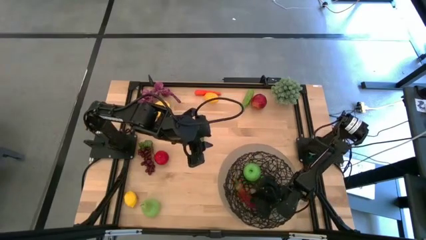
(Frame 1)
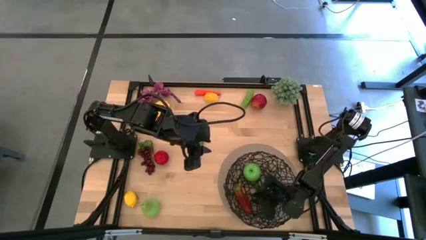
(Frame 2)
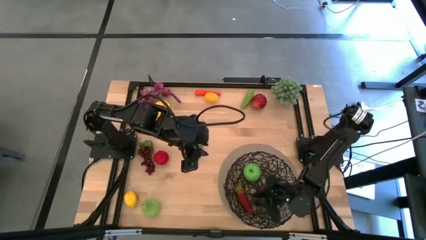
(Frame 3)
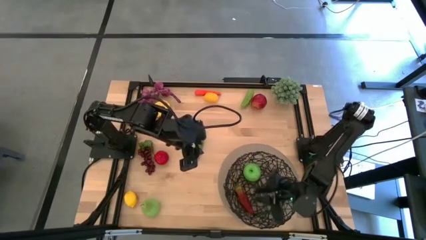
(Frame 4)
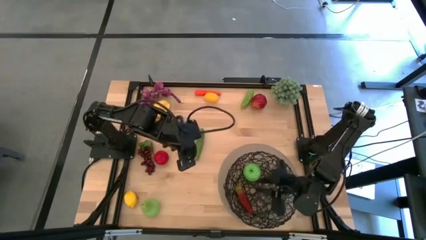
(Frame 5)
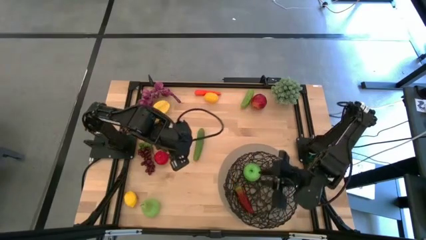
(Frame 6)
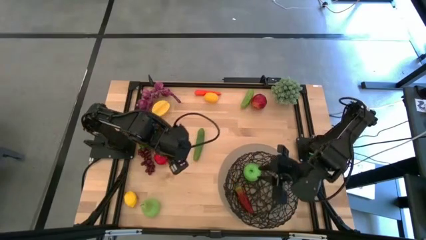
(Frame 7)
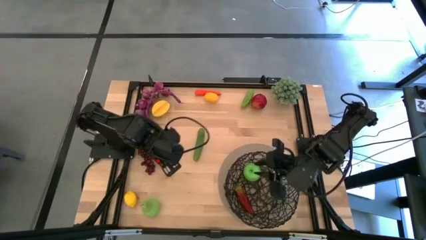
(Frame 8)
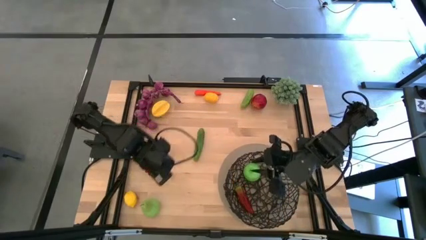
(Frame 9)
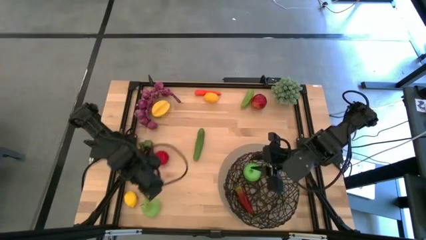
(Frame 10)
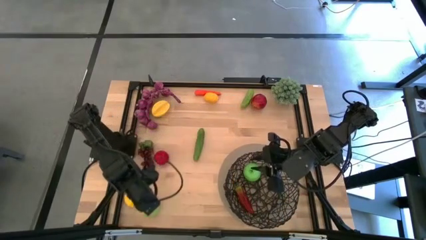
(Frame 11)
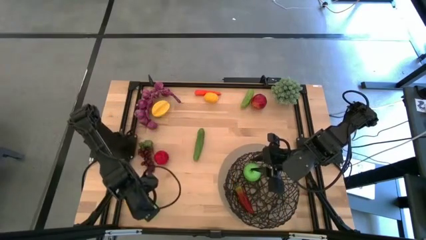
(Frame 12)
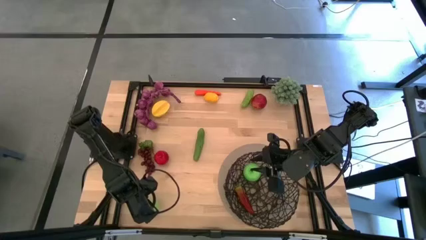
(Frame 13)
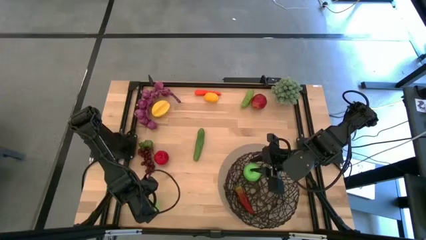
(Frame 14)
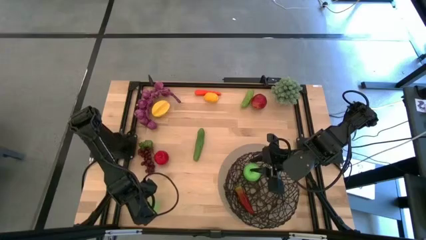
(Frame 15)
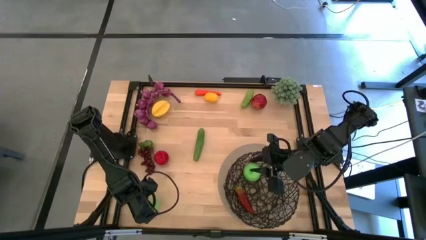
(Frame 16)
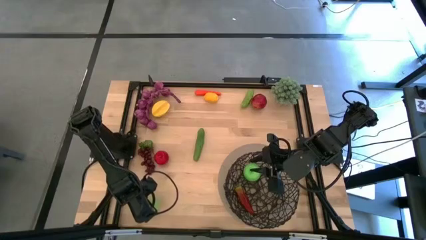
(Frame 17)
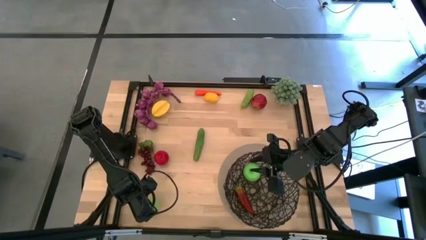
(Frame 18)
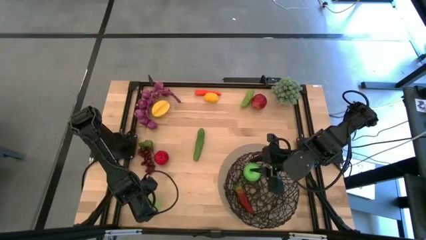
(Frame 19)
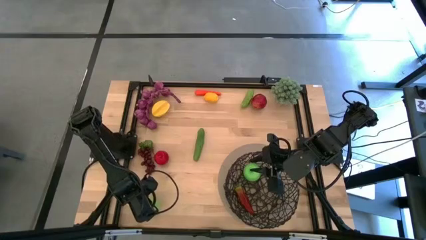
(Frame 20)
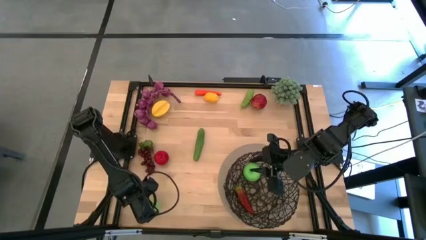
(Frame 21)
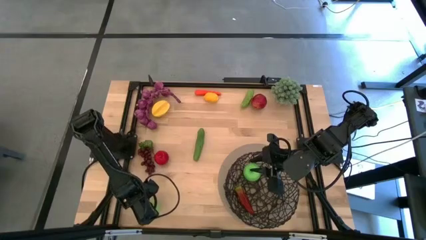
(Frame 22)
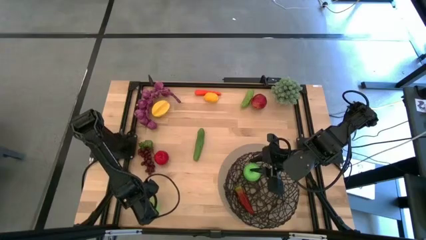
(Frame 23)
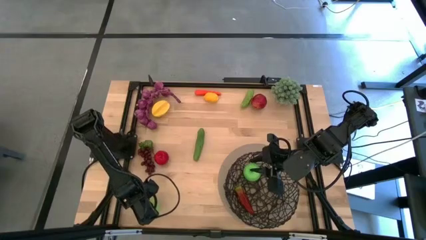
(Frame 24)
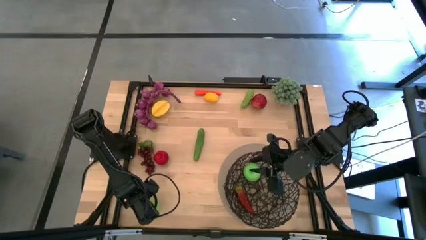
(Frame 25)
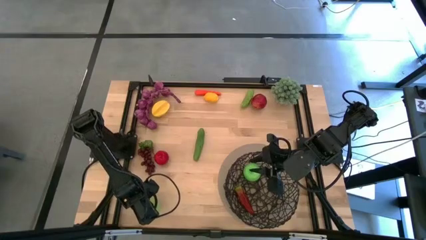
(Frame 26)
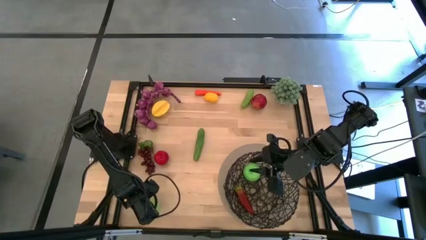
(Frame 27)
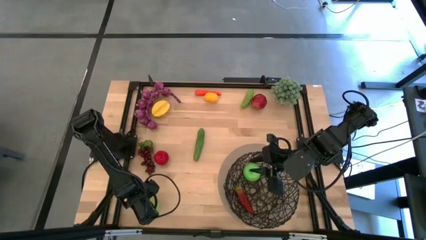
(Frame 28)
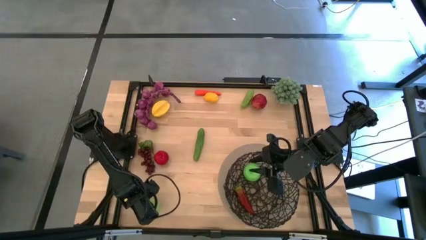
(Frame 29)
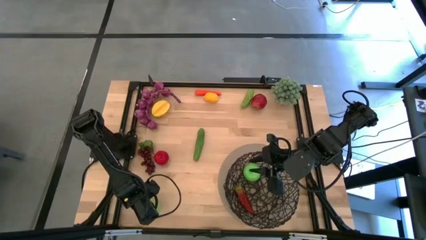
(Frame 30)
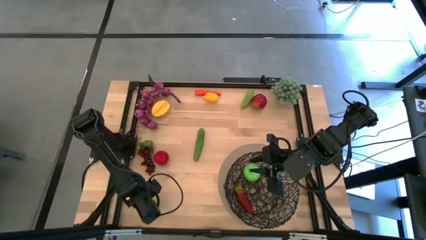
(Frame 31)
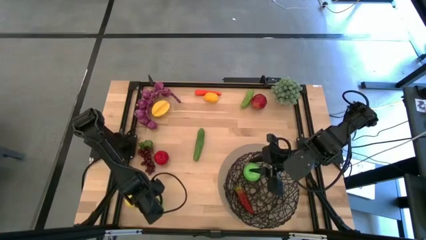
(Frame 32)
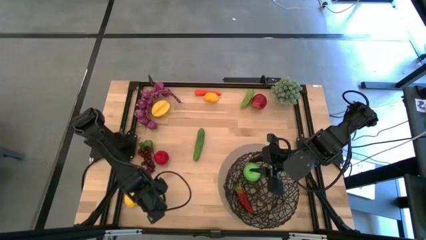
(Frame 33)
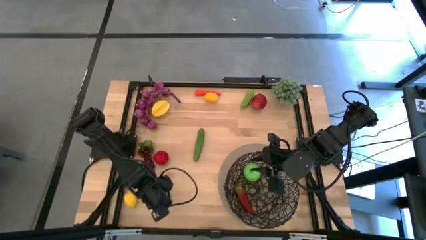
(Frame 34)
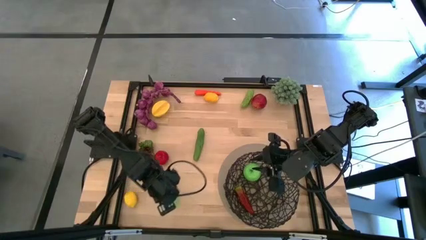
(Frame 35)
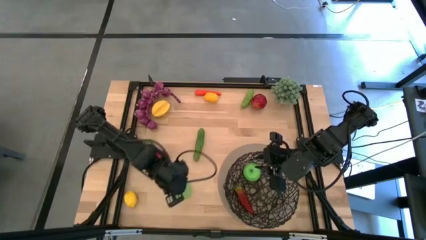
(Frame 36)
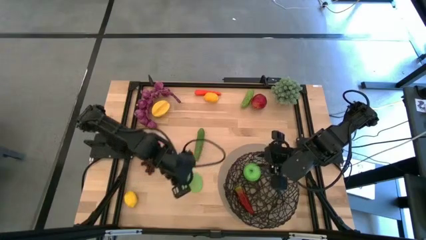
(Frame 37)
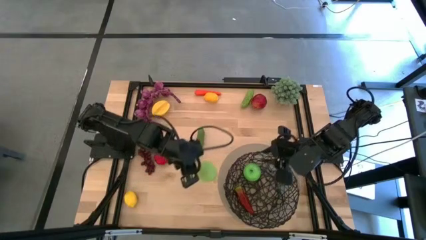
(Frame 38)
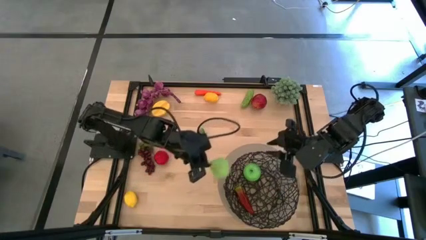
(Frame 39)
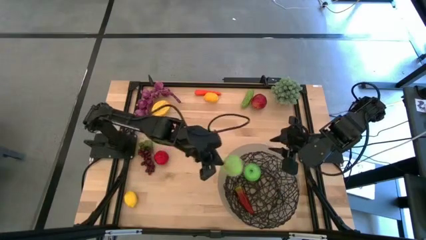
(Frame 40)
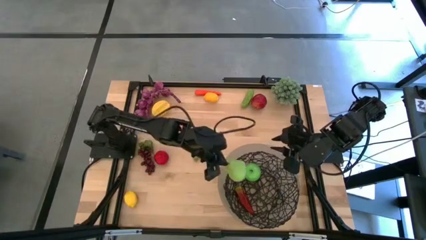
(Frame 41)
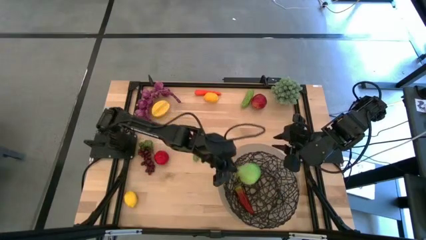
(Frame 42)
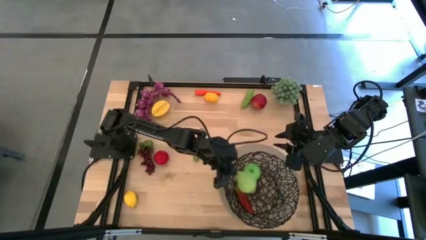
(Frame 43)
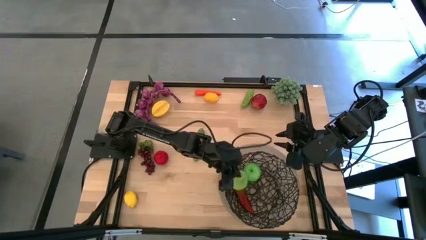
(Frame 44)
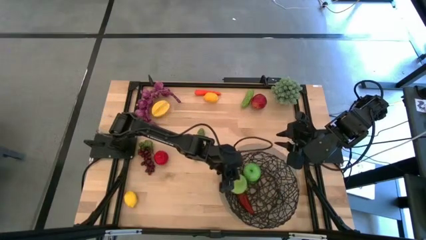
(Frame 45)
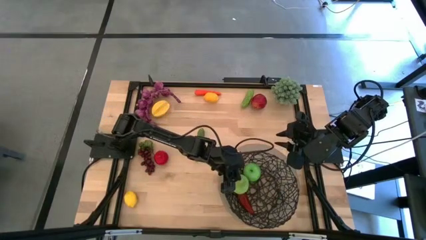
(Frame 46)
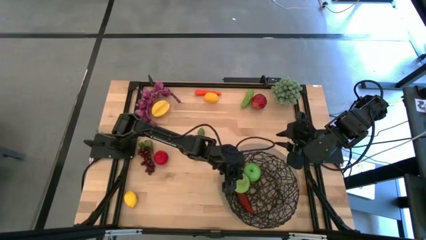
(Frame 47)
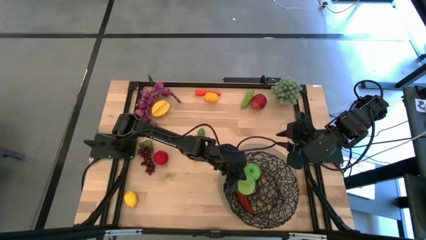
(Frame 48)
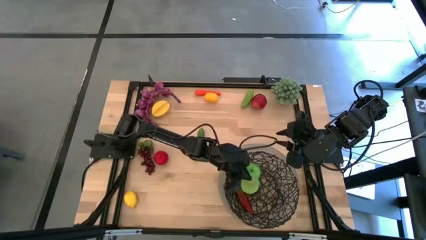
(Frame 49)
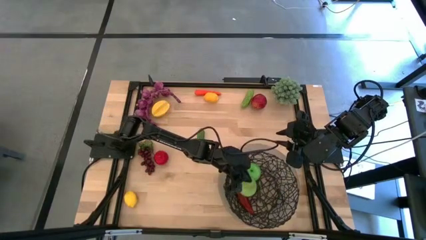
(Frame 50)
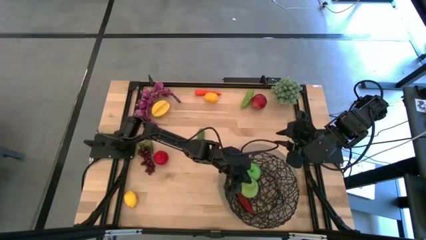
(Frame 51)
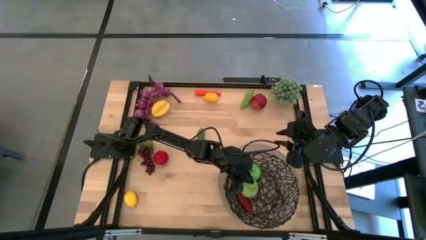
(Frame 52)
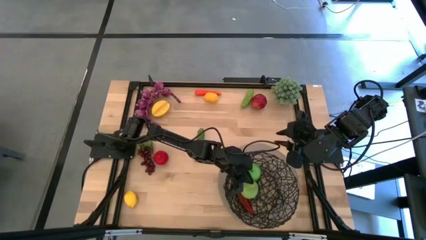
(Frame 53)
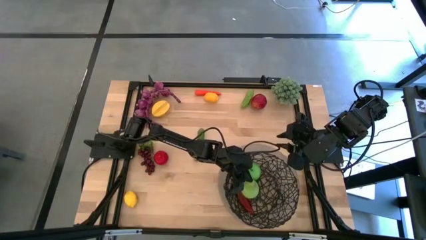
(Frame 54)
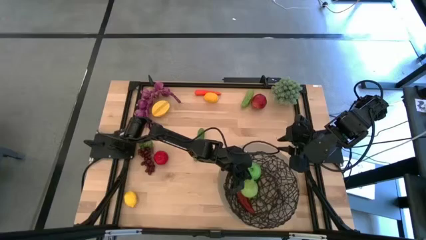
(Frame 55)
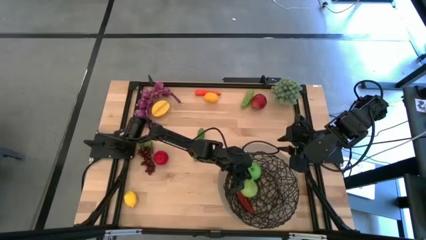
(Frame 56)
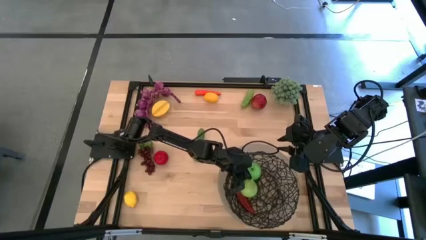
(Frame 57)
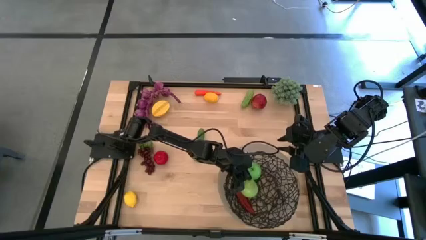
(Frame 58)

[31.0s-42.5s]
Task: Build produce basket
Put the green pear into the wire basket
